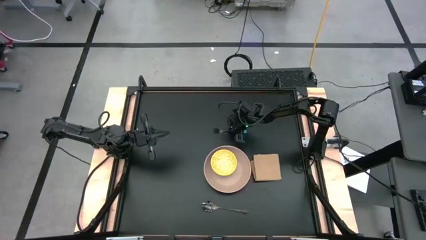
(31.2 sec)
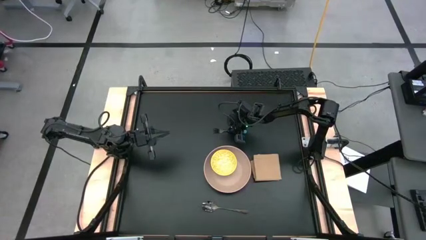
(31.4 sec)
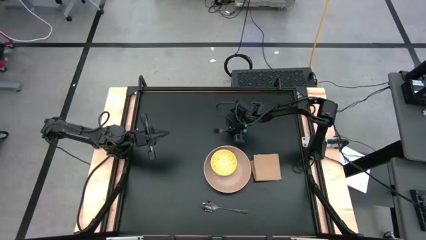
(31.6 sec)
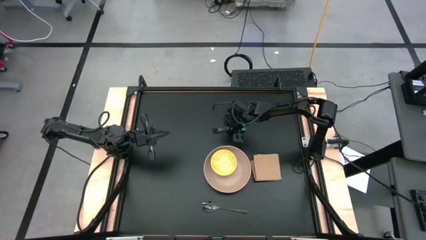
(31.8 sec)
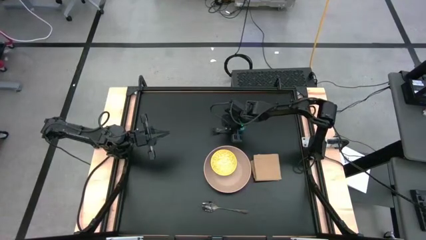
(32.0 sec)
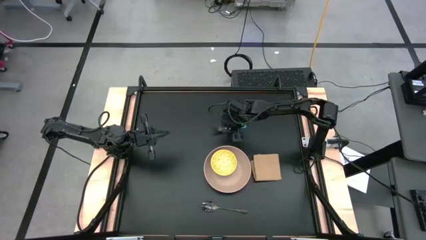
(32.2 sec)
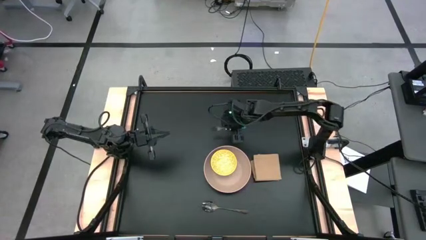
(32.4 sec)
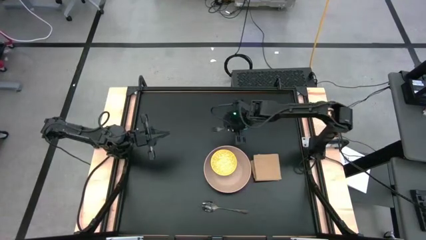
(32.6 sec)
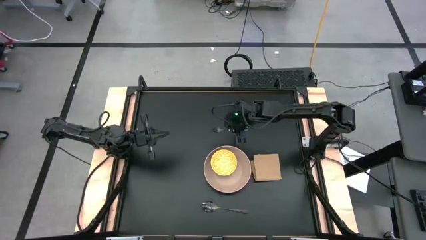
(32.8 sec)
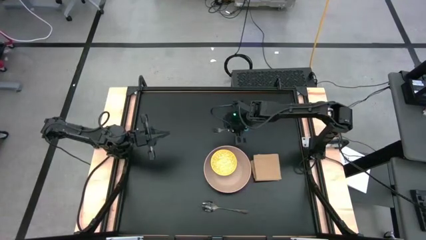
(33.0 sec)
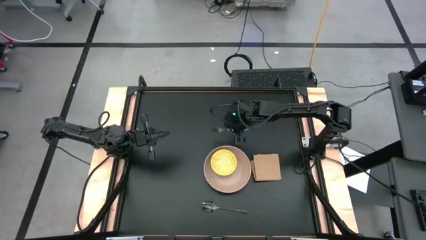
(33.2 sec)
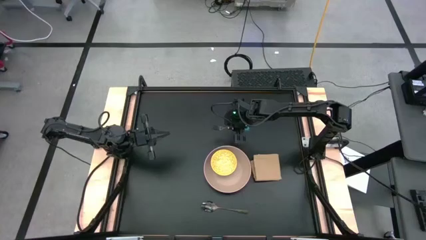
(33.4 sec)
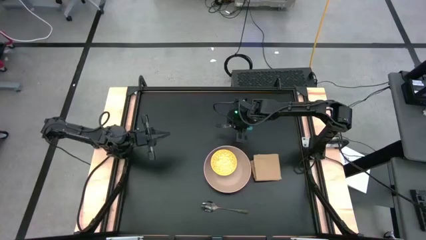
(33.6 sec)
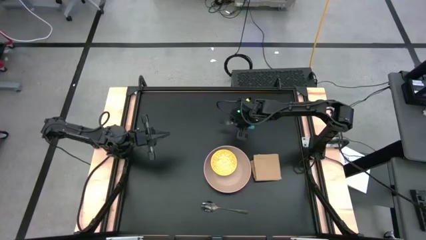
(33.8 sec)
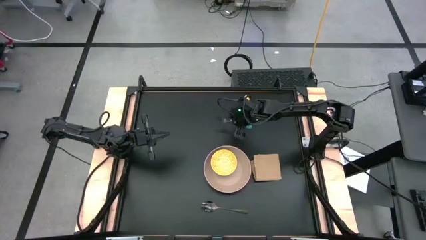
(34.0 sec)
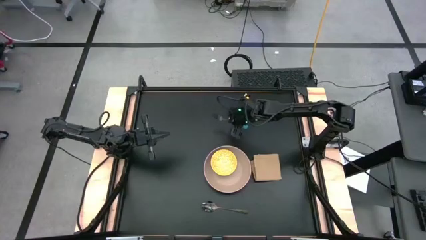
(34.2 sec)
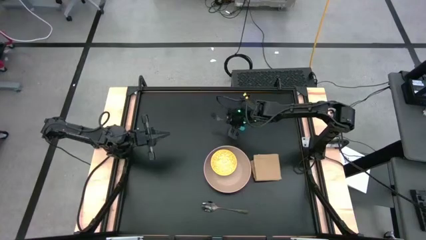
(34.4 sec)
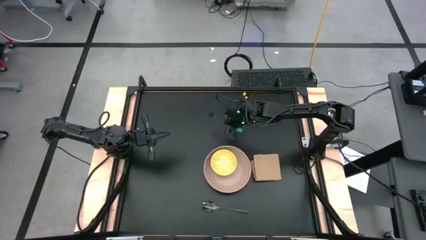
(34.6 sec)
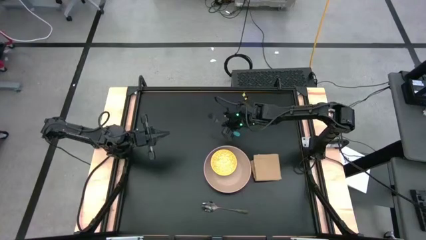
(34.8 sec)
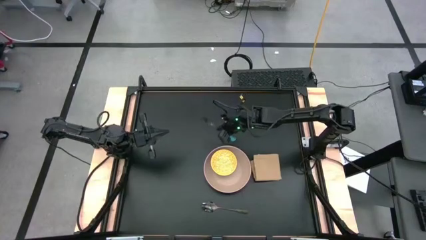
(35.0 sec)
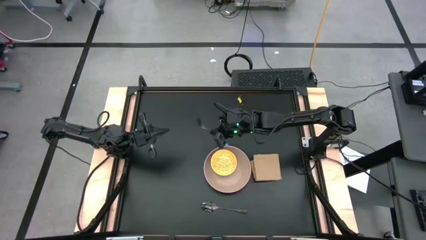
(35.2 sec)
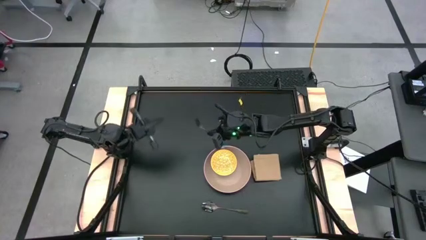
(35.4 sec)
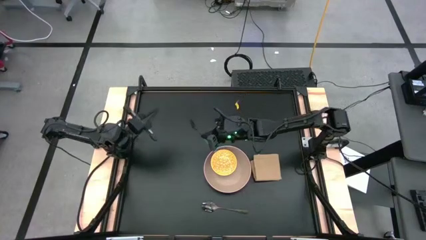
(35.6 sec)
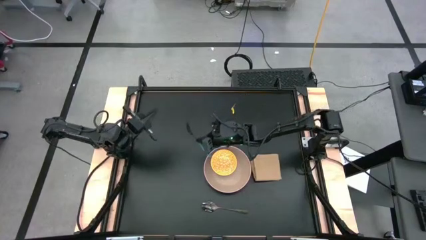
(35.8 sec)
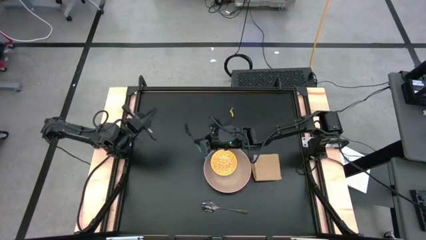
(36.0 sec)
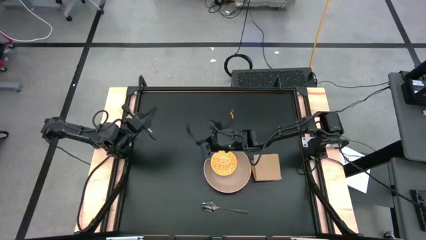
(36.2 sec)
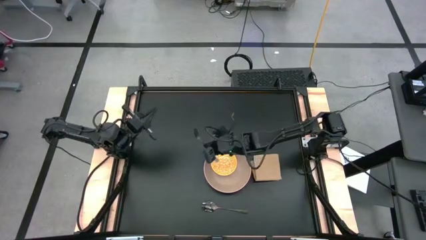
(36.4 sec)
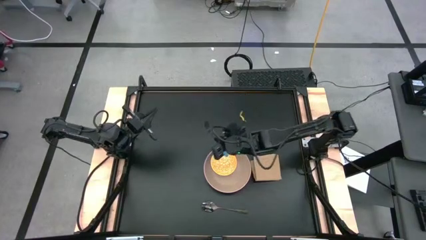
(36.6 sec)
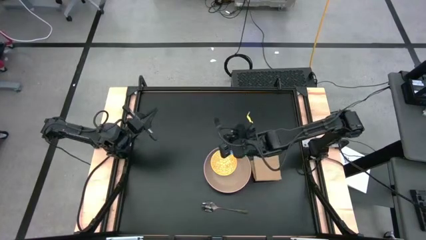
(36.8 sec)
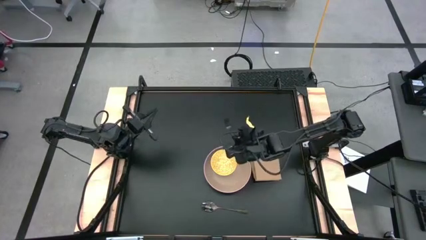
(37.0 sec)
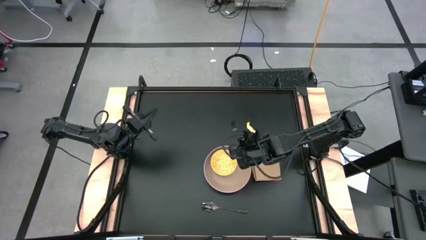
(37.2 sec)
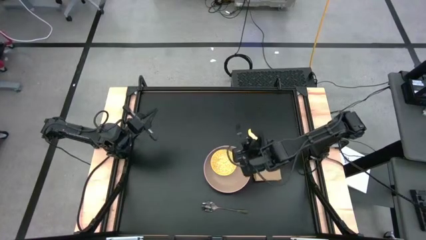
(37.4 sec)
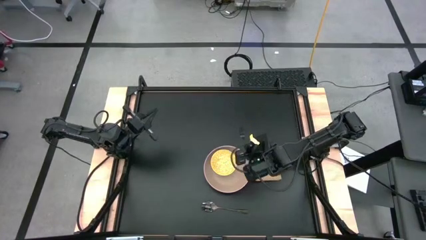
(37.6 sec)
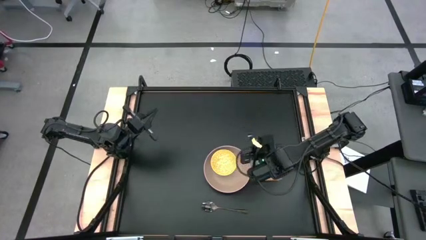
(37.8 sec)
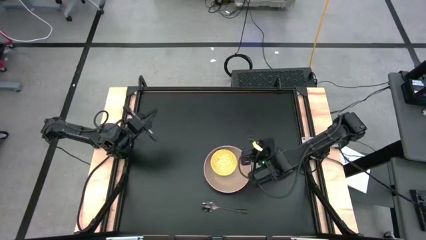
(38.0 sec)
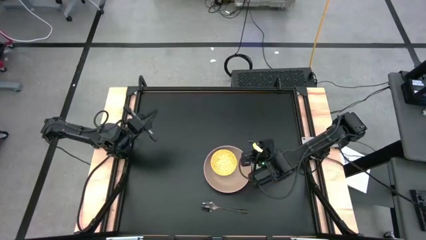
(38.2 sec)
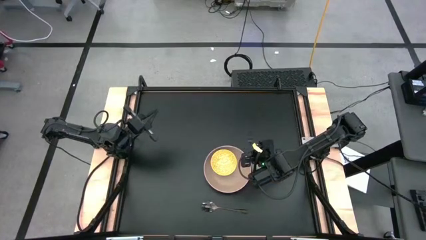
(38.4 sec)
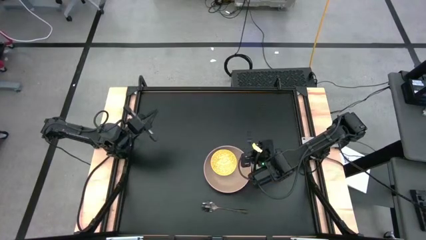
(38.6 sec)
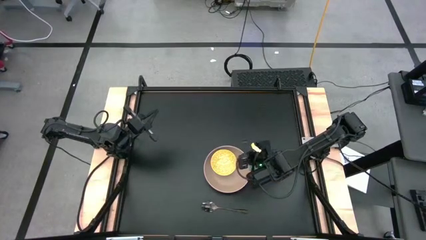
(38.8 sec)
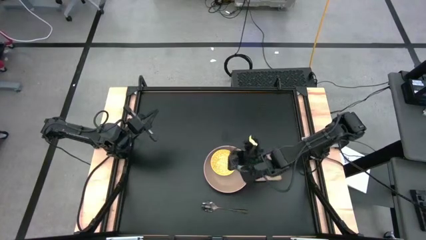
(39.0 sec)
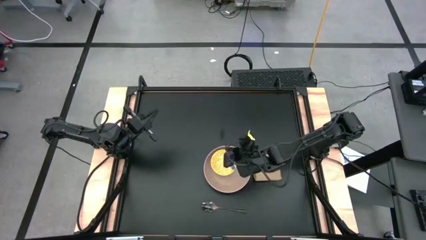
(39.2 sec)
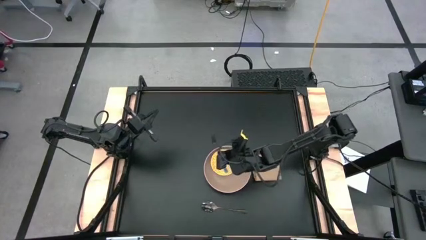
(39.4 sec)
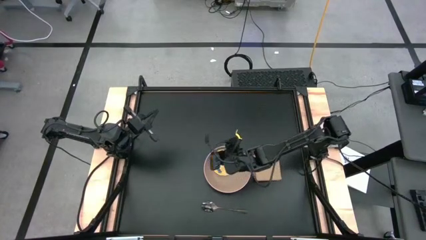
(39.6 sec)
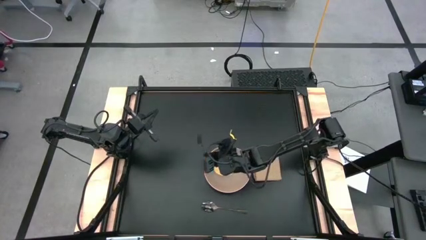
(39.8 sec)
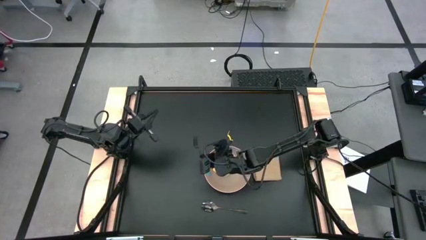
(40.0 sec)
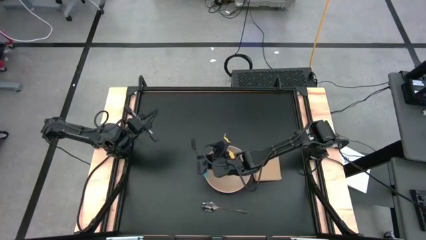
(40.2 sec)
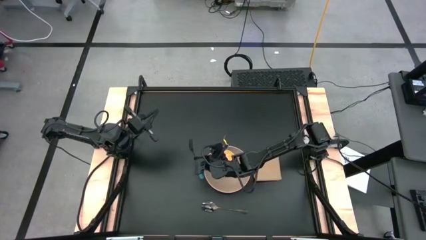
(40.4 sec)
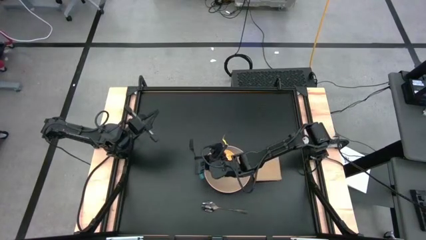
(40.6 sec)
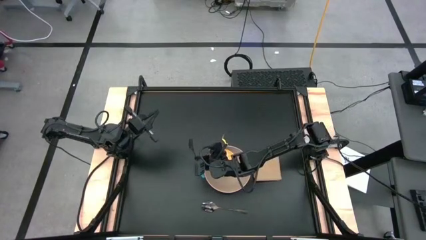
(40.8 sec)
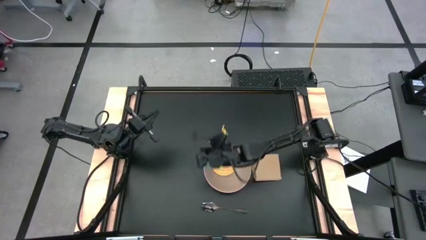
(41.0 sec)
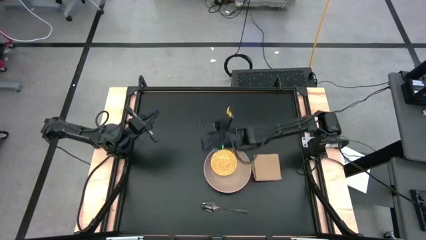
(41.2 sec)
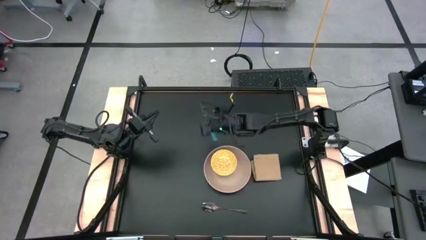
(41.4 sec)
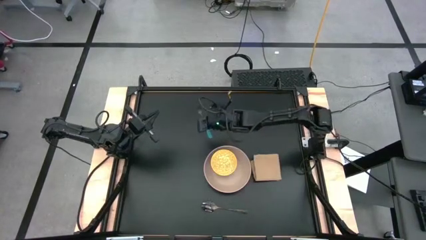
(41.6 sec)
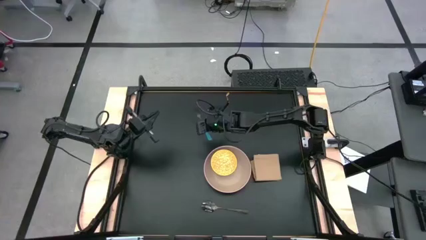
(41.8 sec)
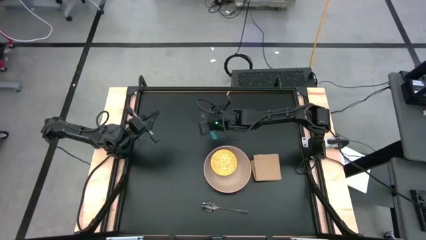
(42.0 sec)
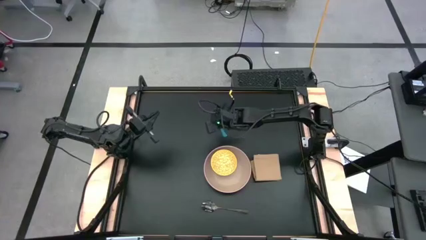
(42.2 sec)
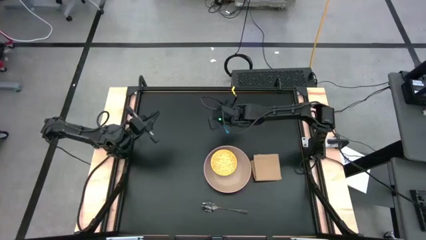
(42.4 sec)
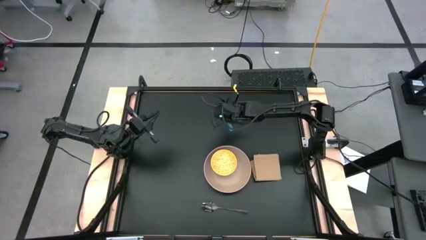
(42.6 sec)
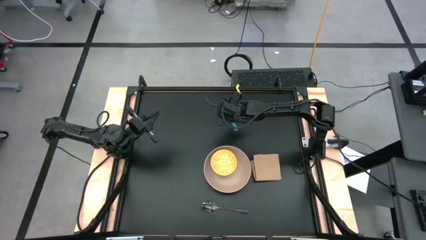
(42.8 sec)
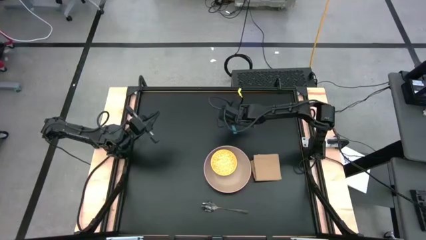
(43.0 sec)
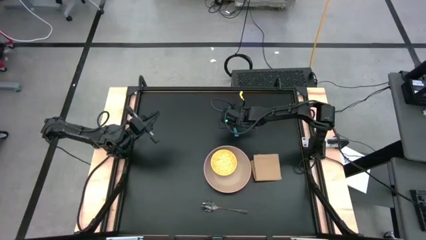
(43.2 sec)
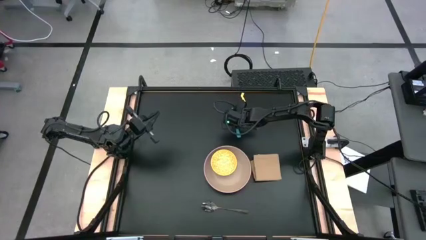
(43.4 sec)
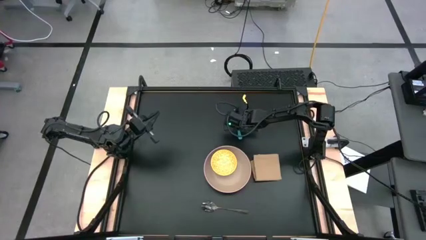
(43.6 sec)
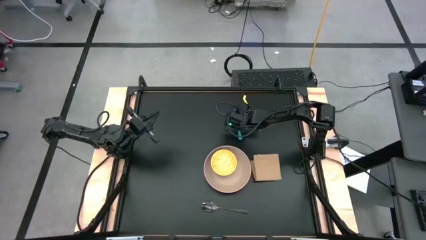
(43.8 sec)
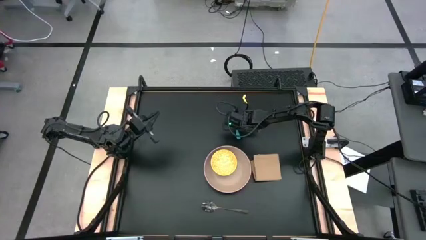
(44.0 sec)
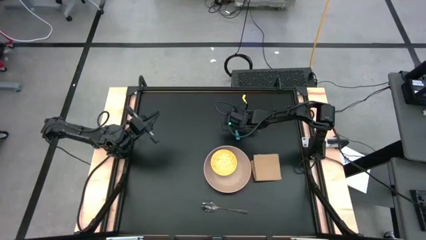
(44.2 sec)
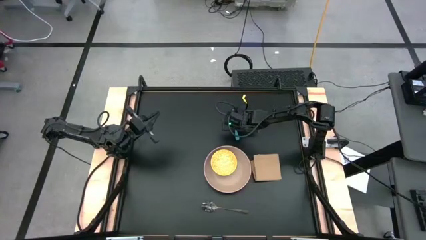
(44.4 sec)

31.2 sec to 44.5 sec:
Task: Set table place
Adjust the blue fork
